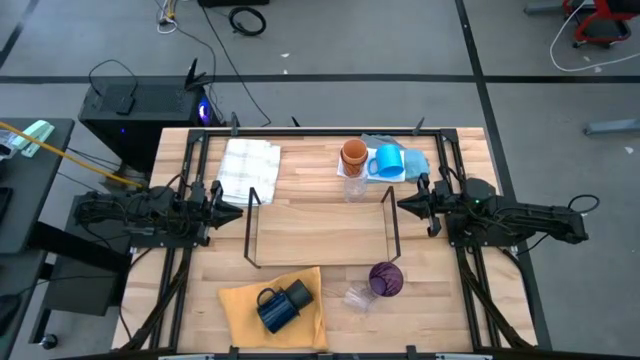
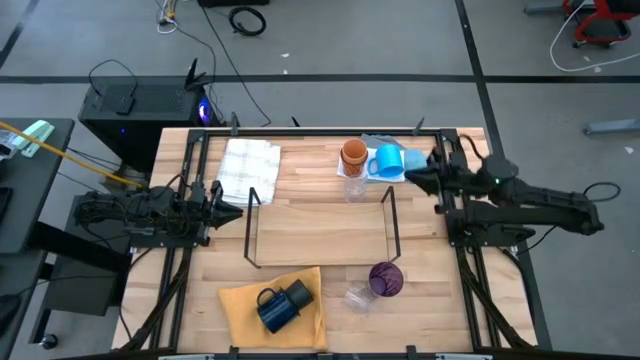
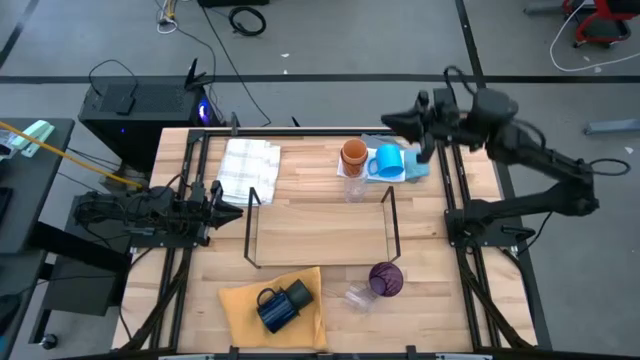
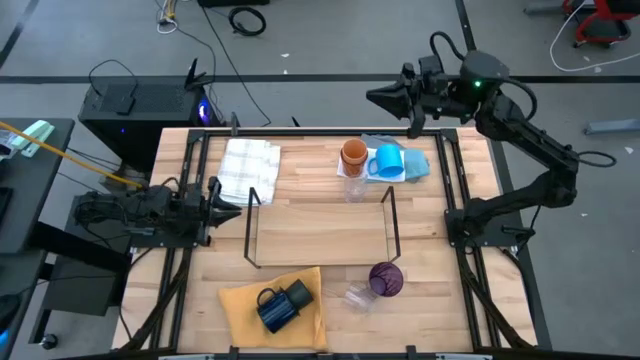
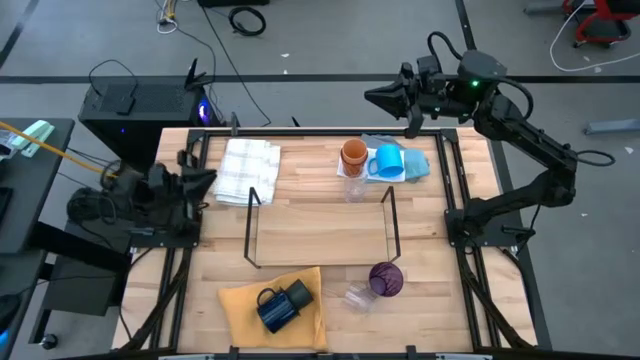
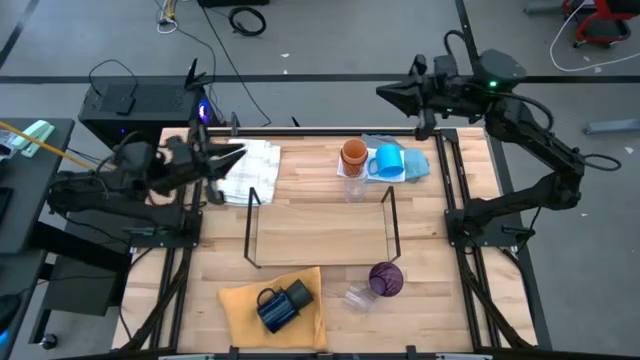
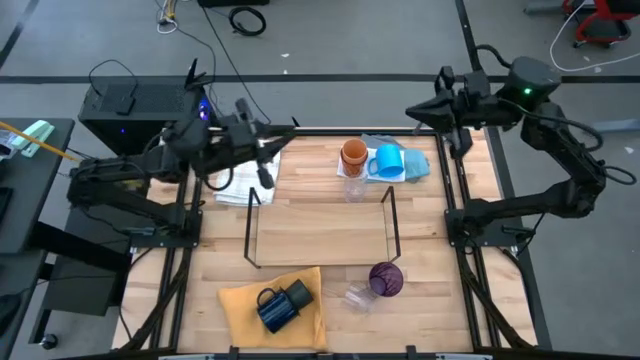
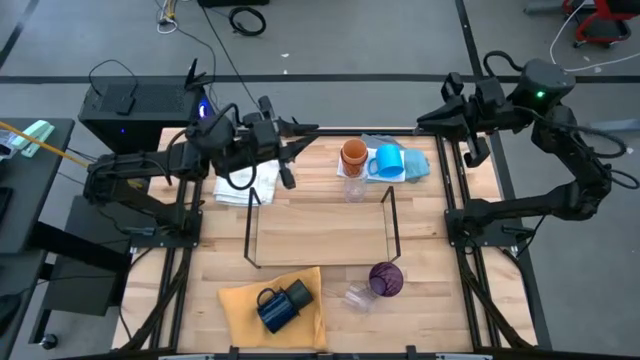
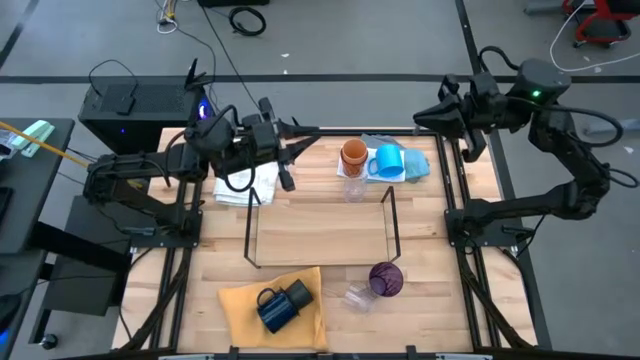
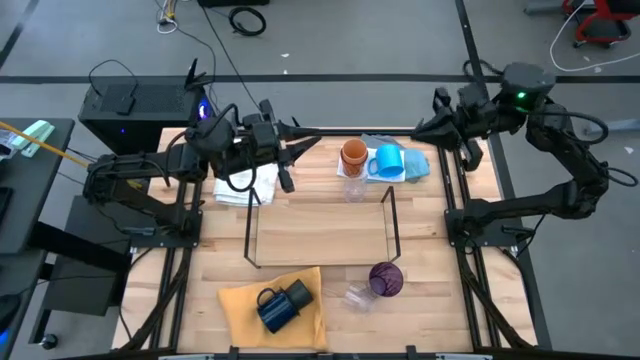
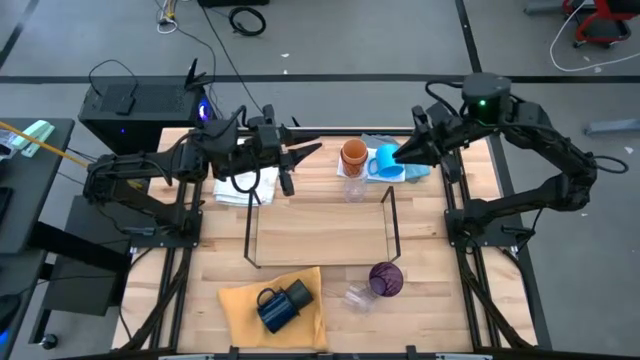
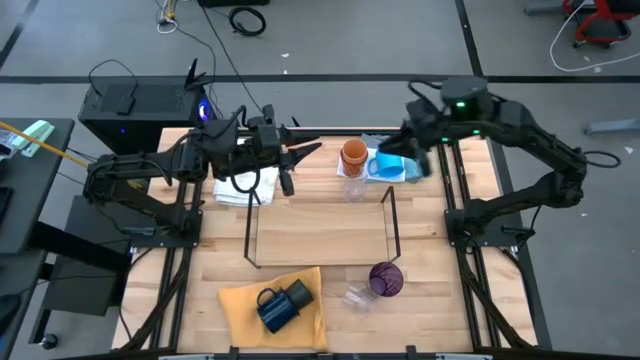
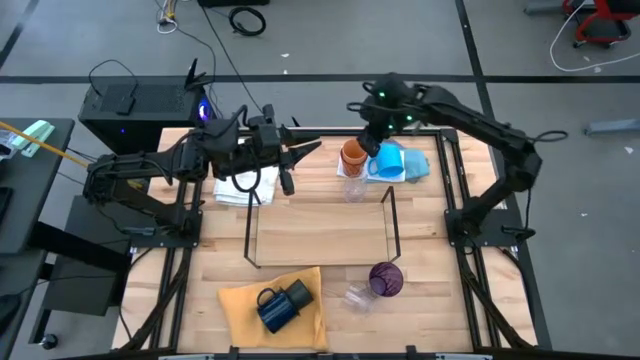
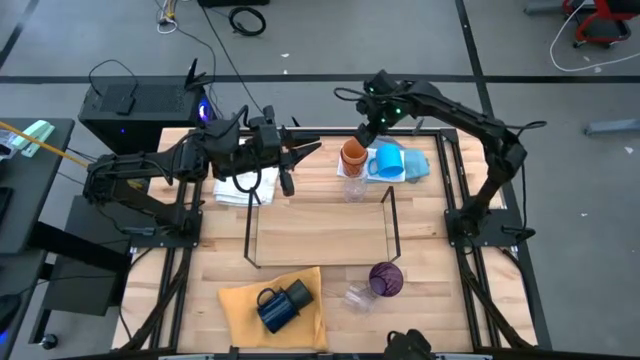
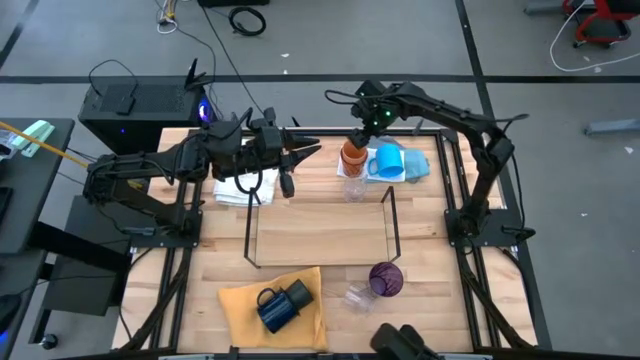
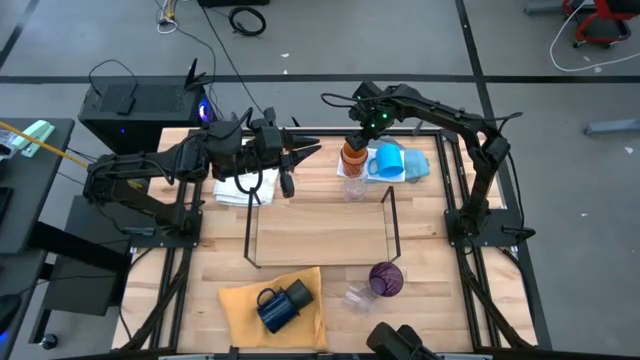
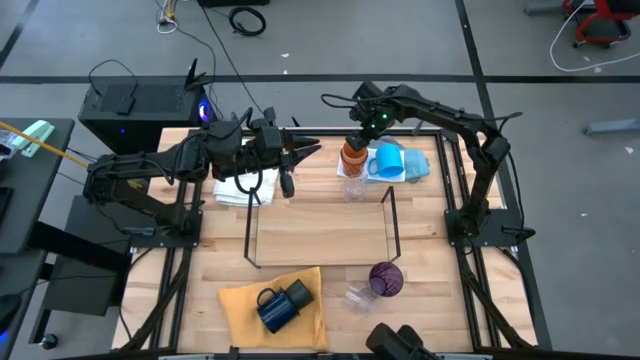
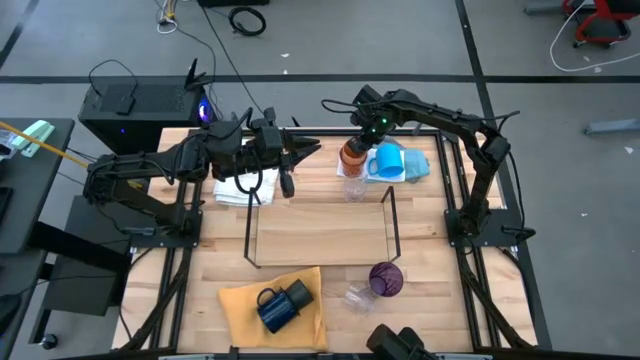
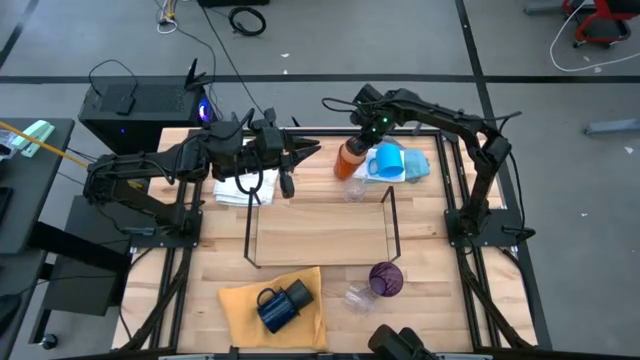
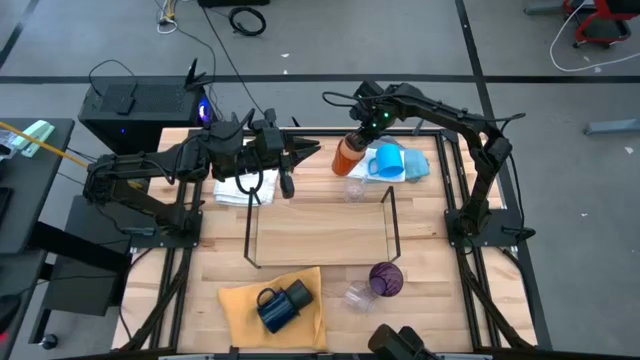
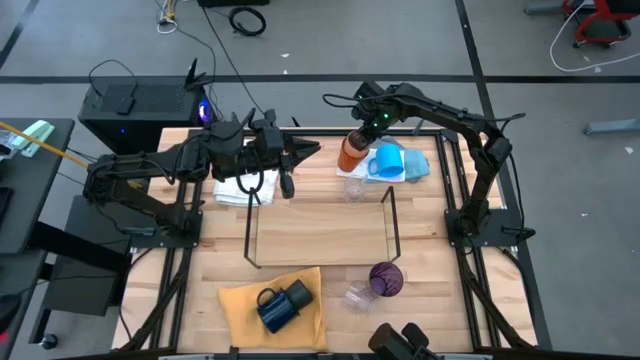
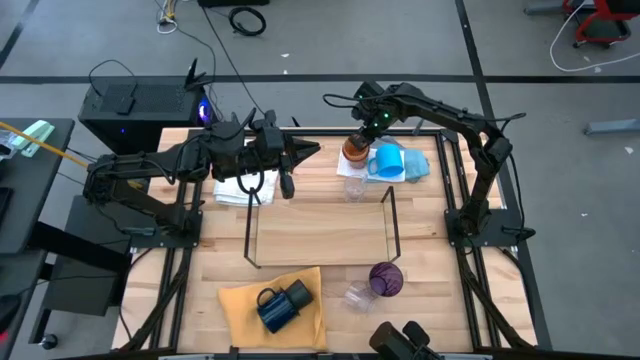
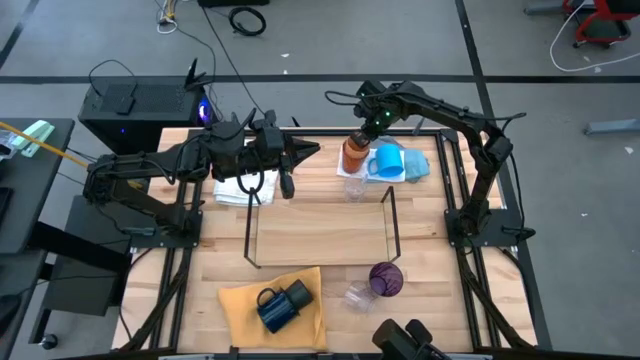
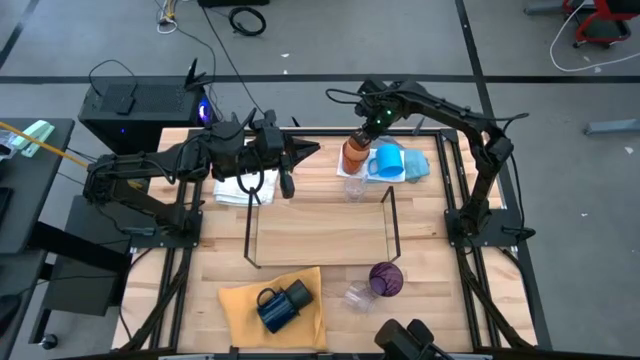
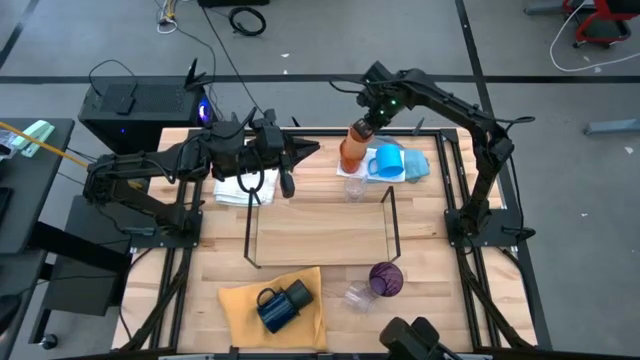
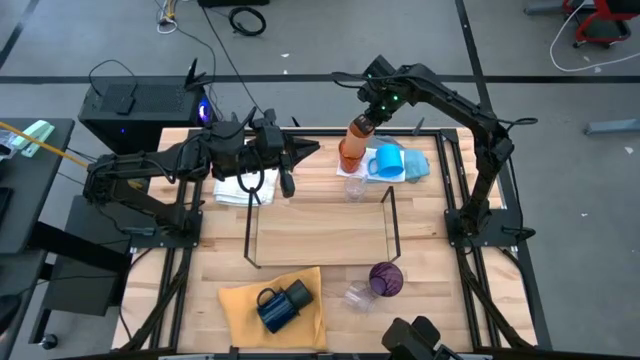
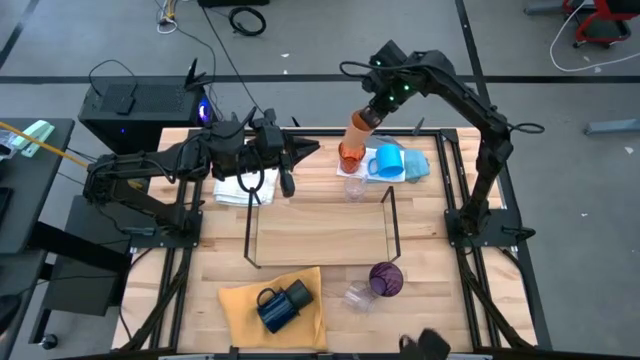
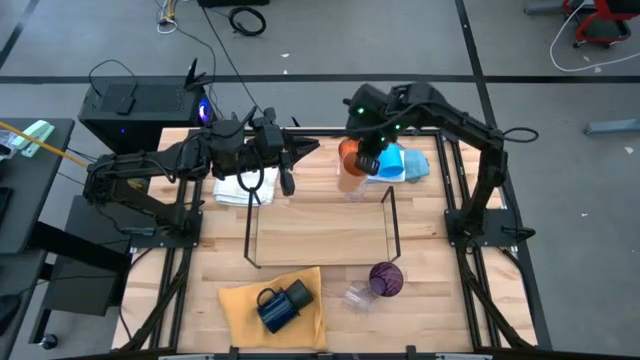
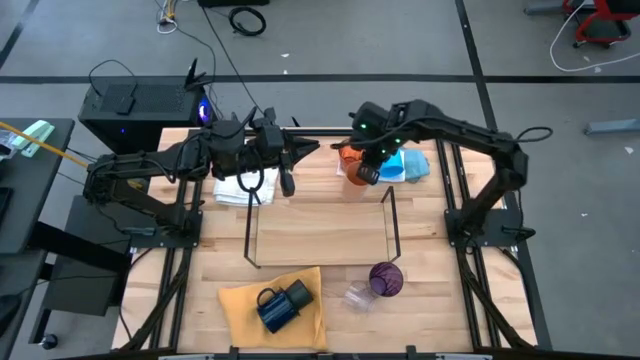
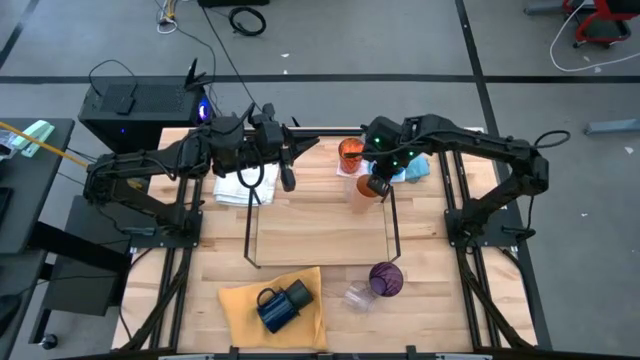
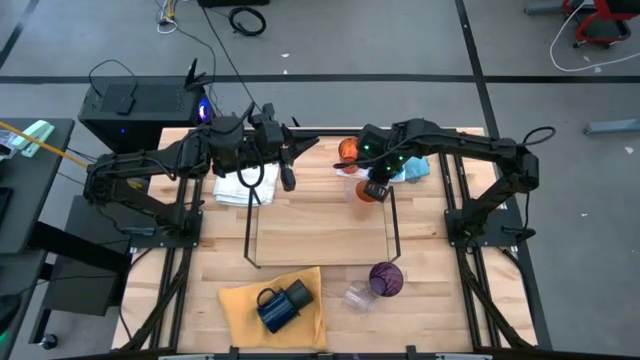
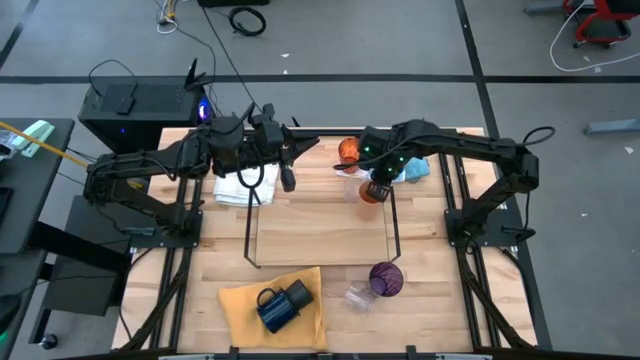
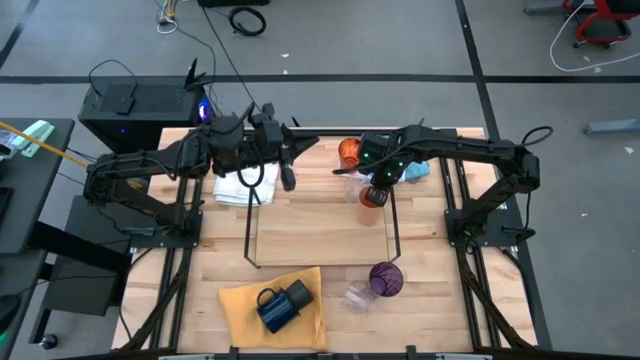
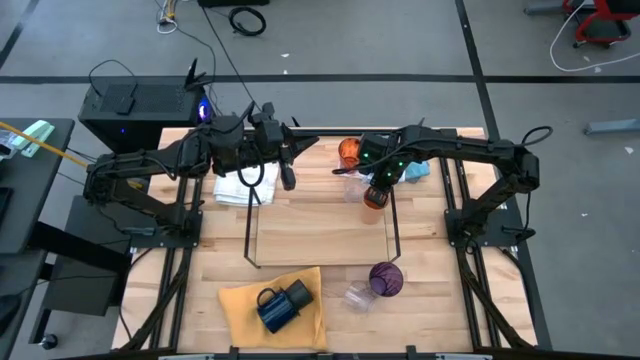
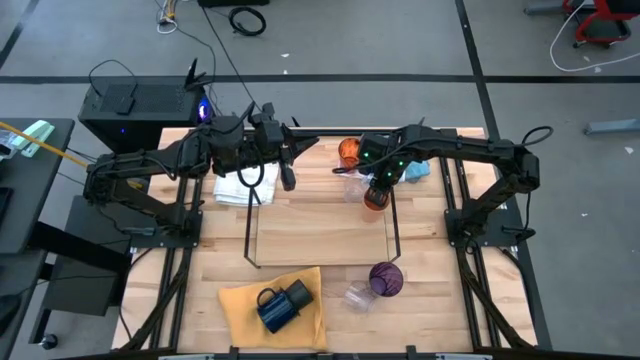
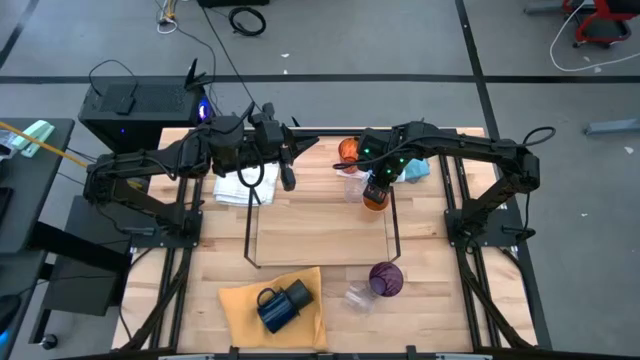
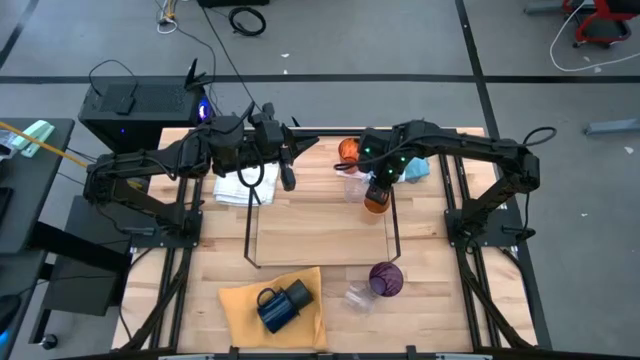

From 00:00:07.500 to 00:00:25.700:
Task: Stack small to large cups/mugs on shelf
Put the top orange cup on the shelf

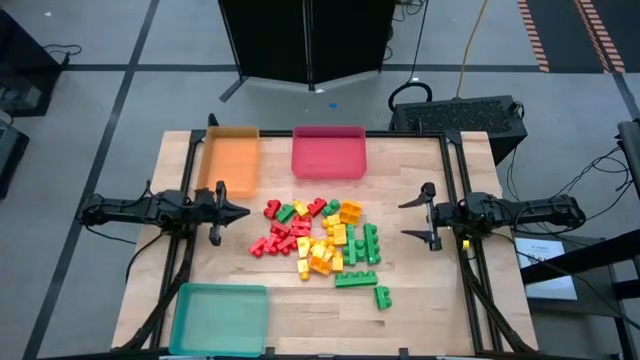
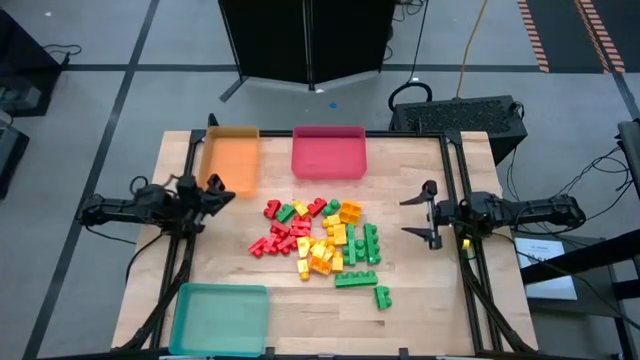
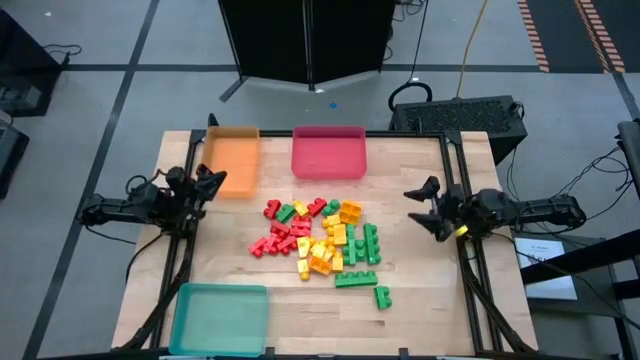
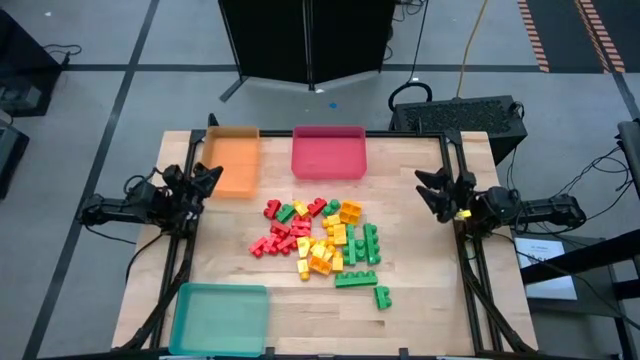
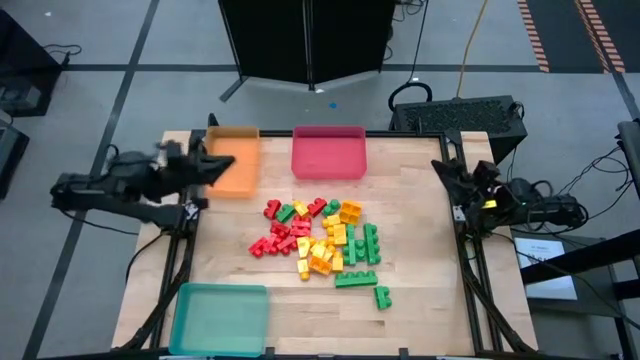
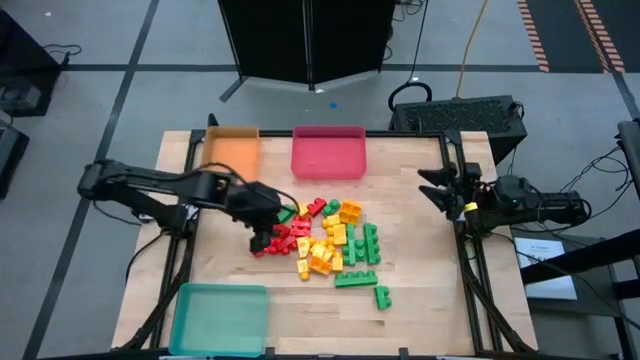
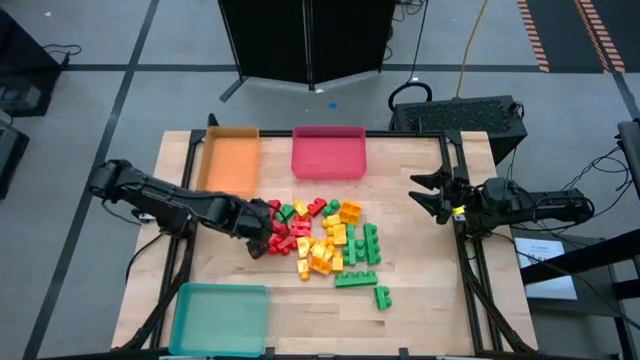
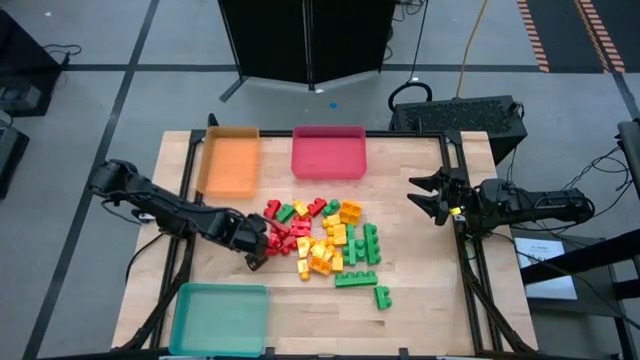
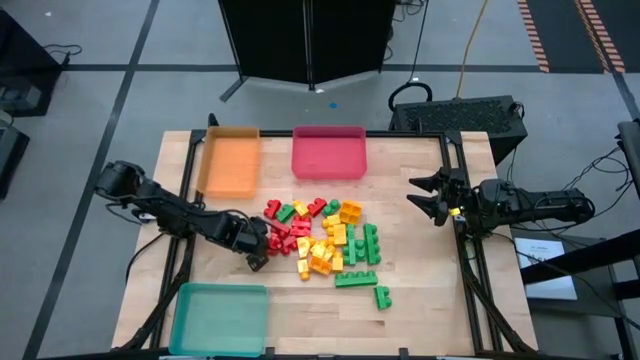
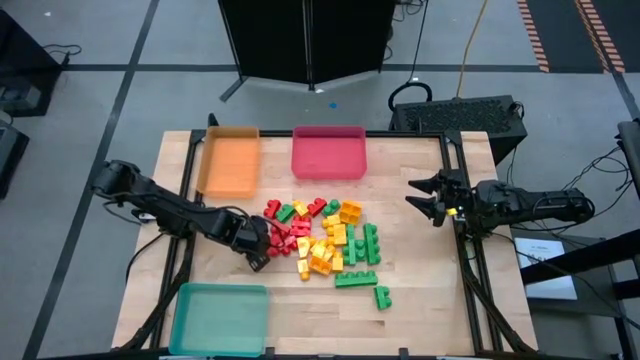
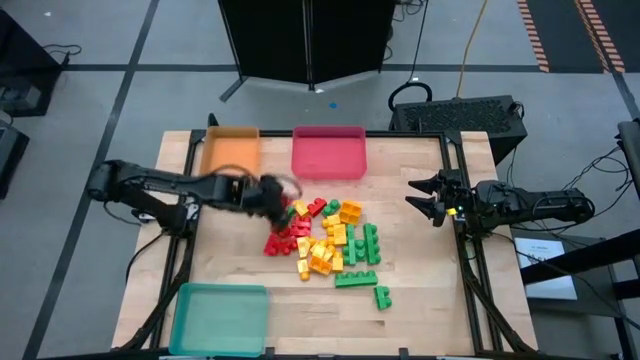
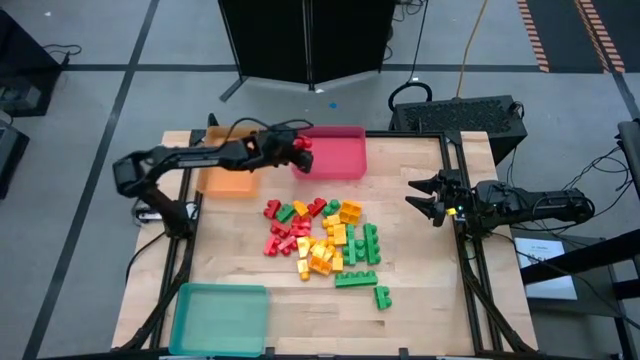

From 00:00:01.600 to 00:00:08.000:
Task: Sort blocks
Put the red game piece into the red bin
